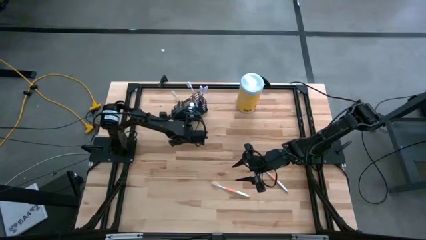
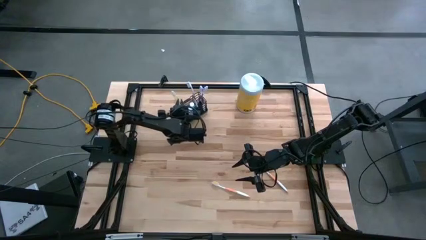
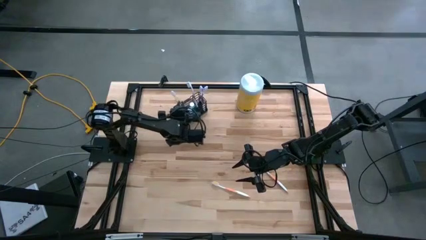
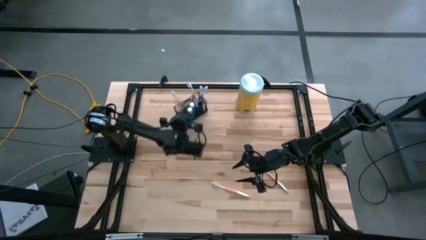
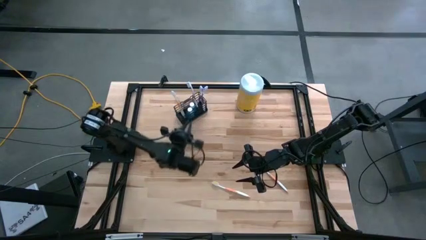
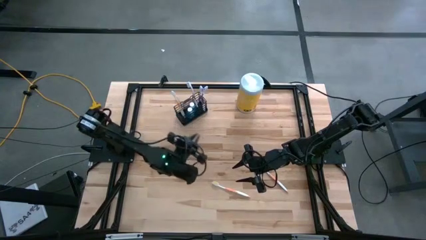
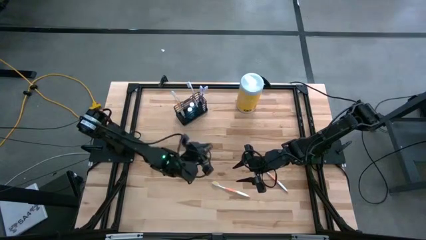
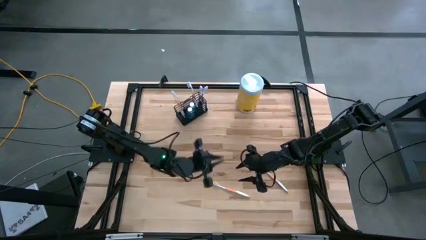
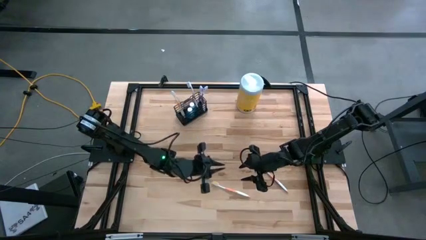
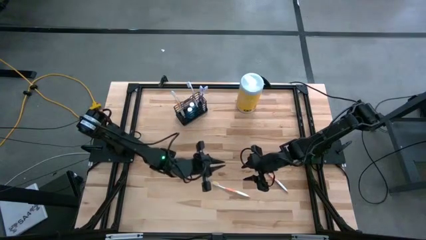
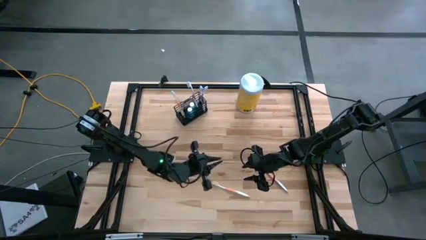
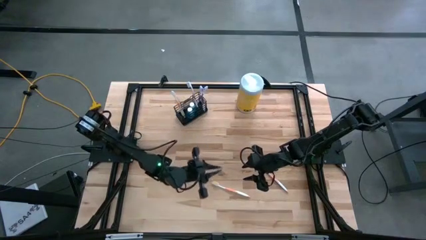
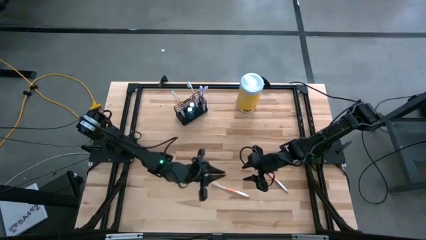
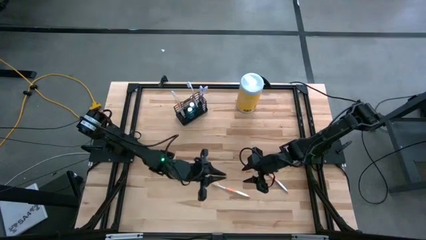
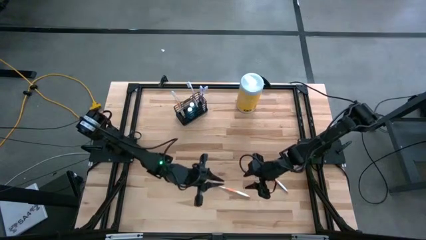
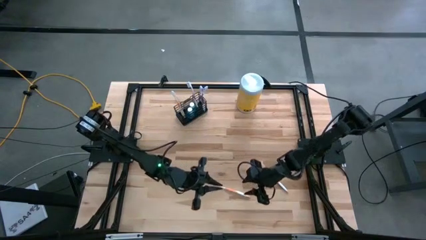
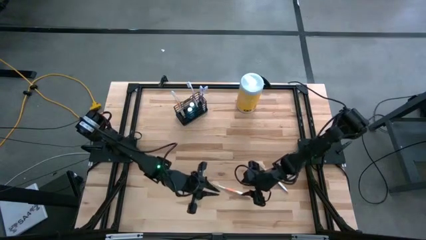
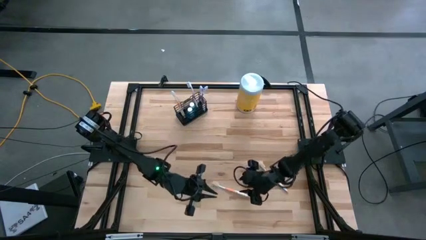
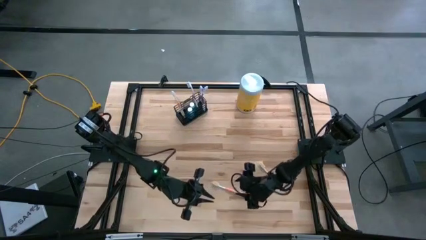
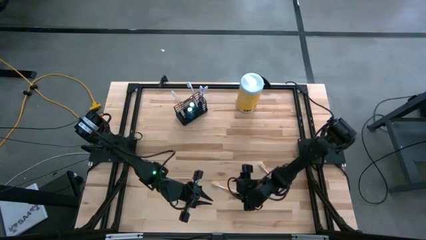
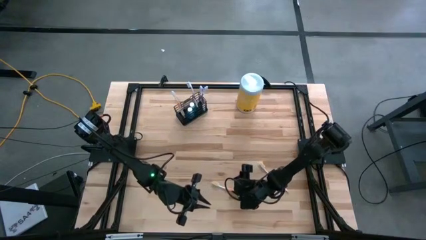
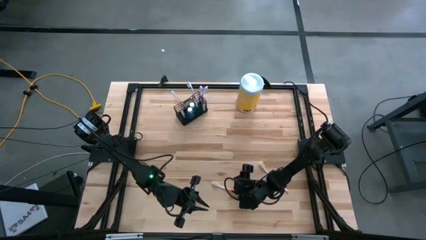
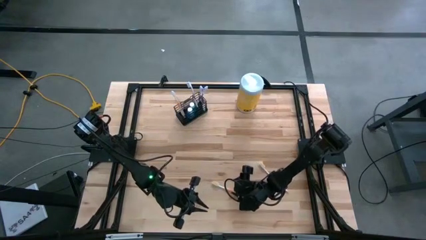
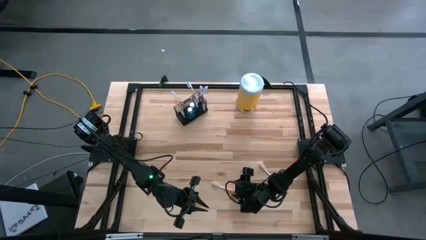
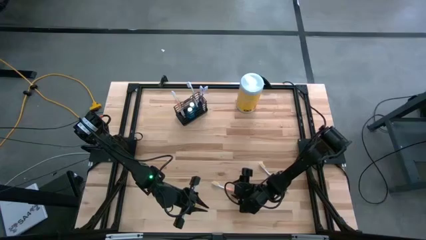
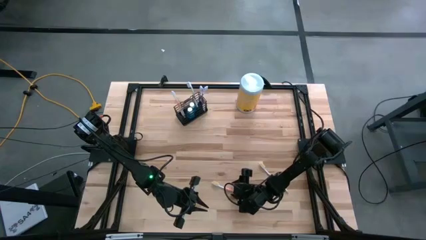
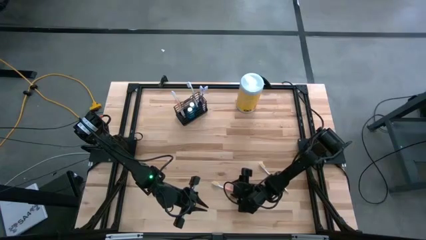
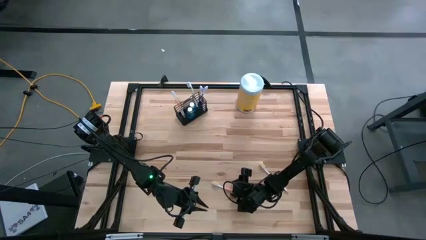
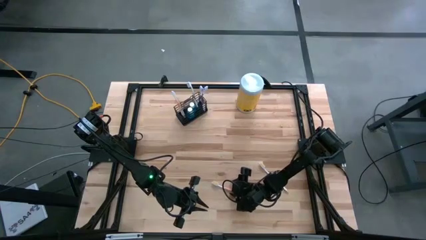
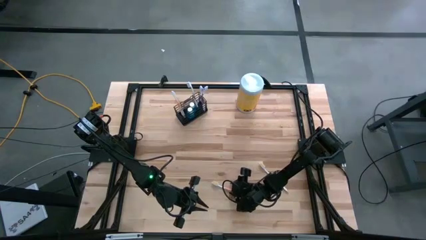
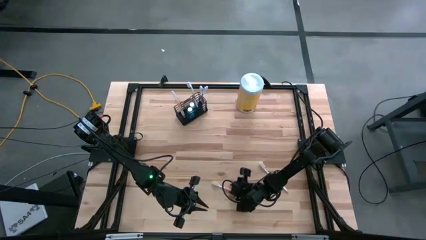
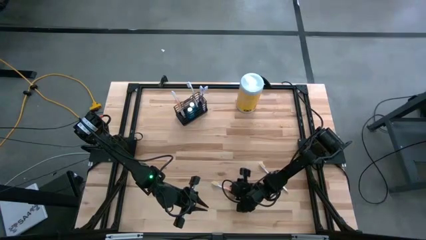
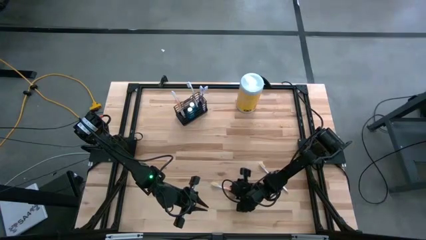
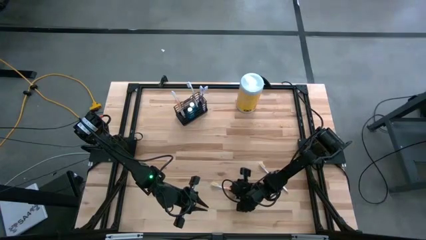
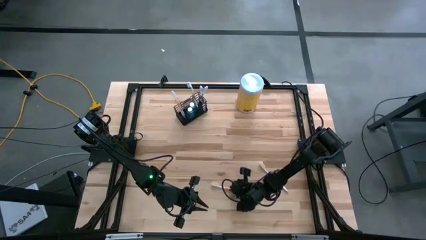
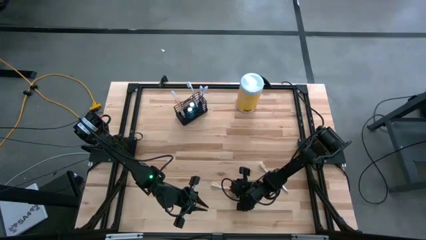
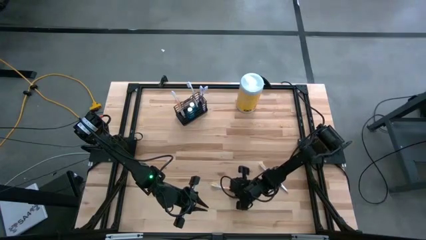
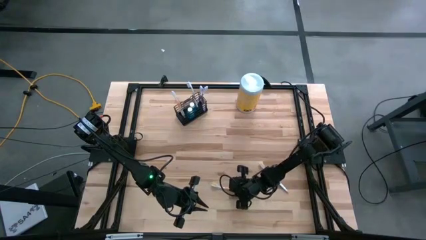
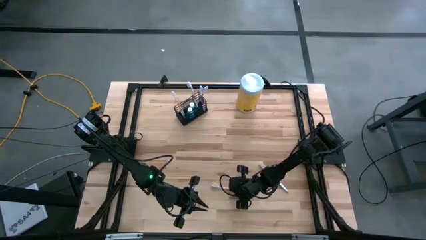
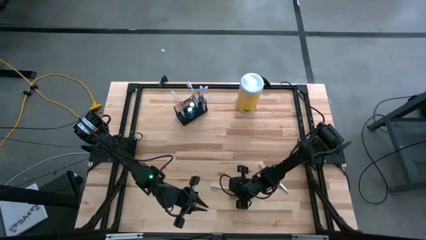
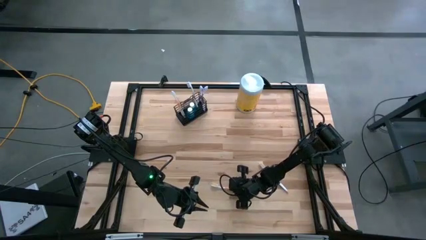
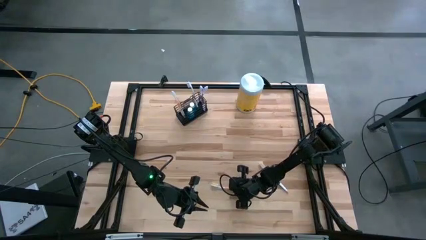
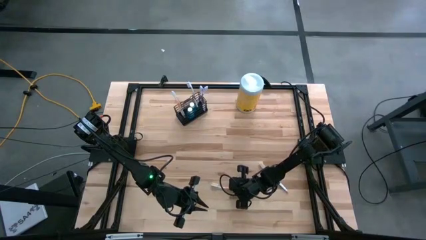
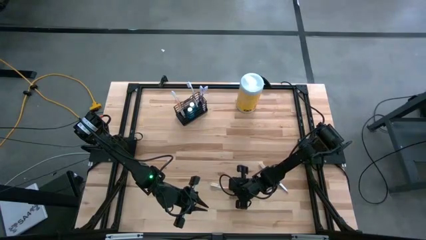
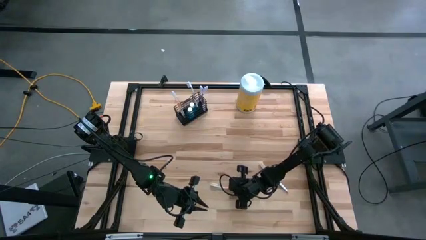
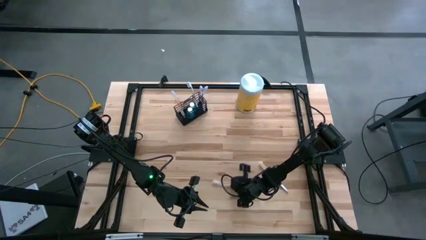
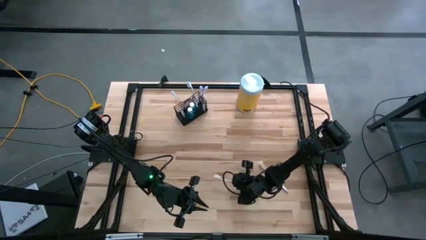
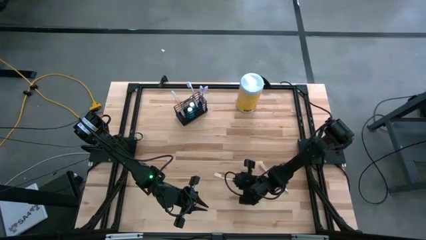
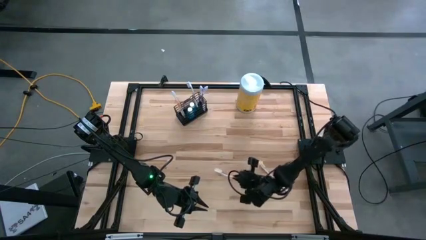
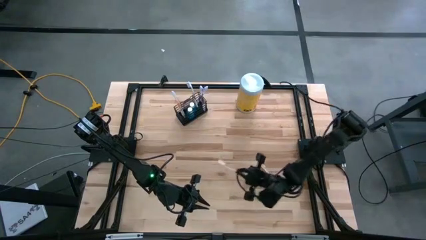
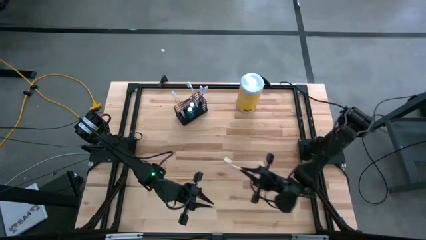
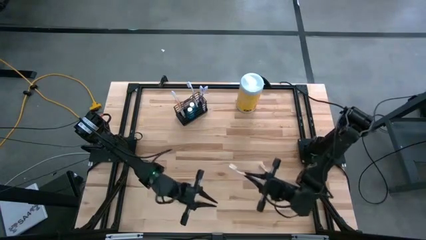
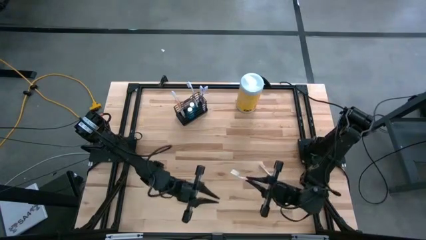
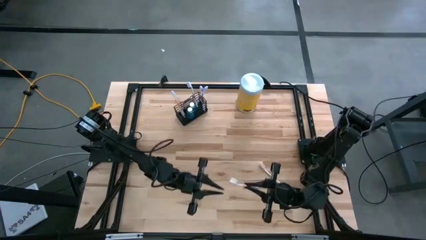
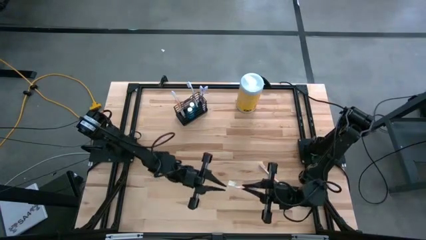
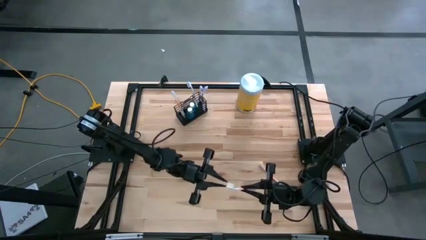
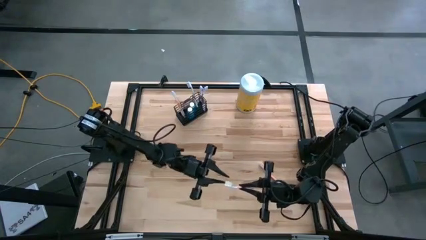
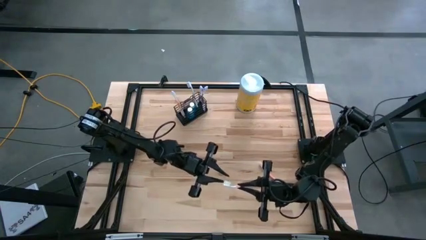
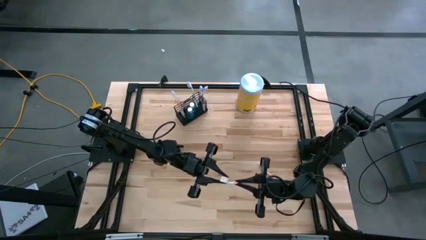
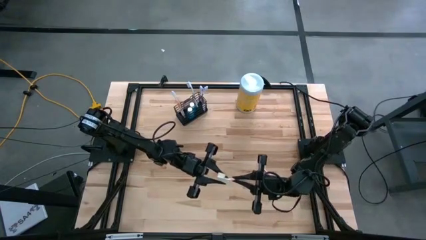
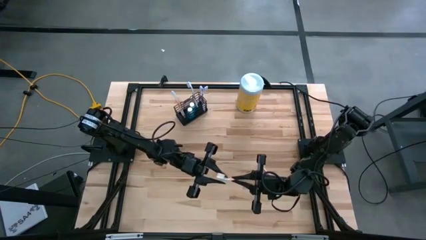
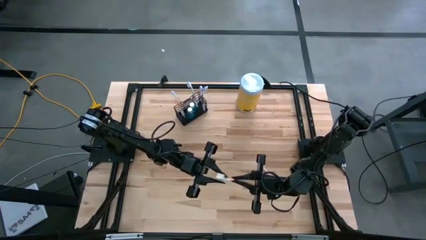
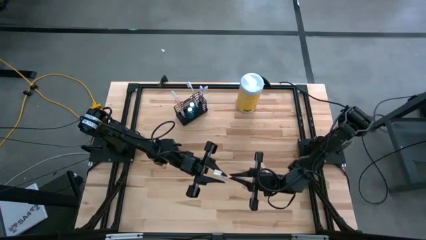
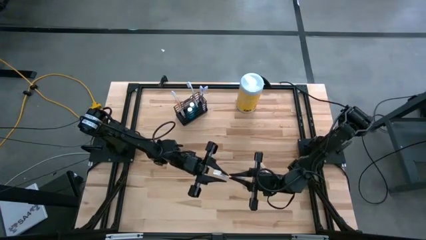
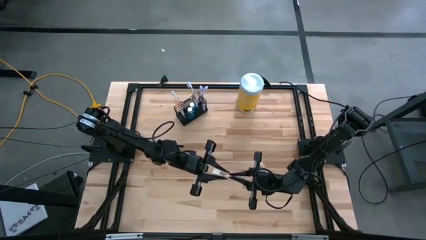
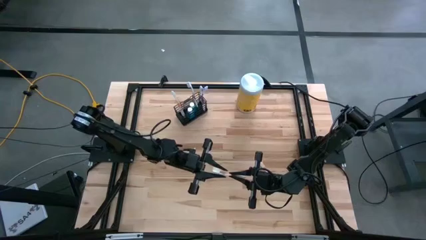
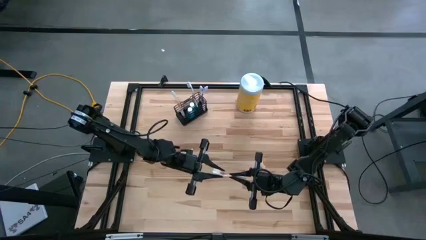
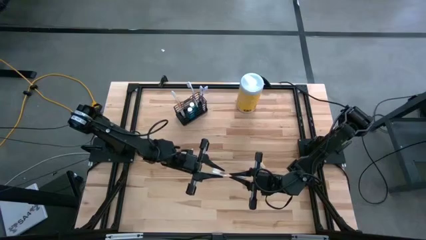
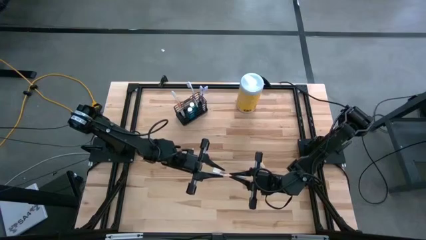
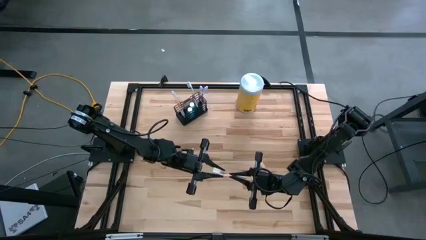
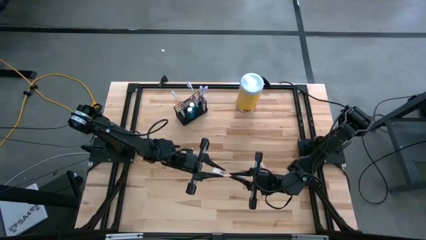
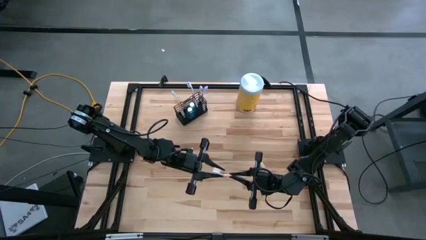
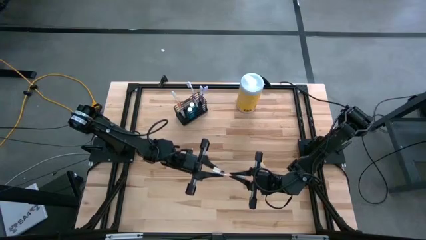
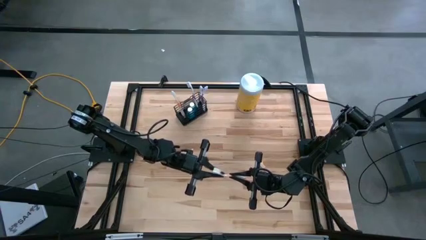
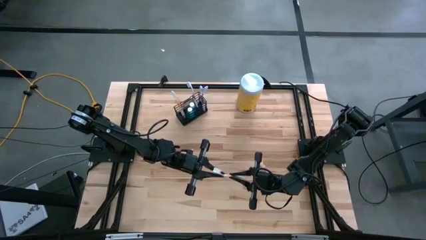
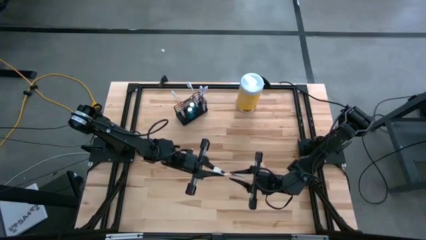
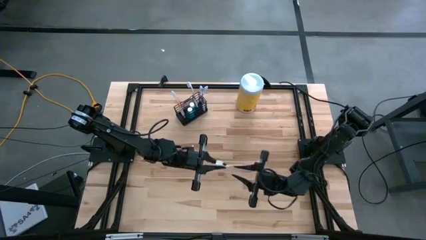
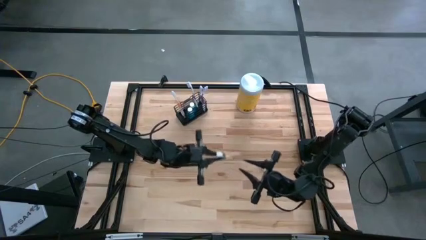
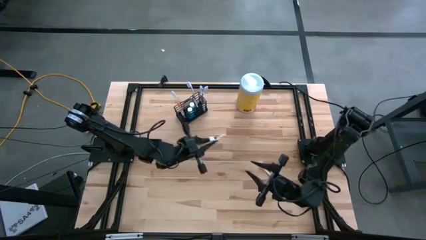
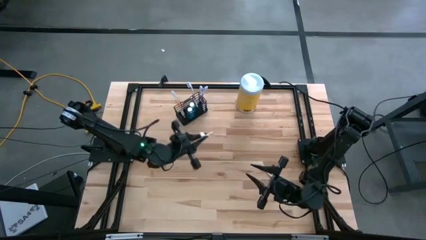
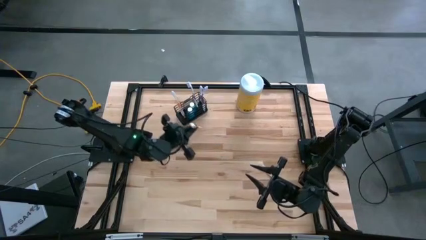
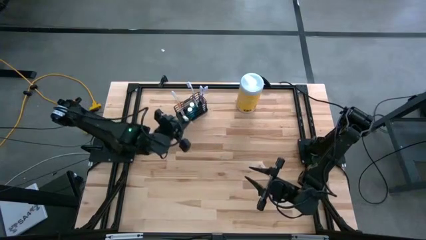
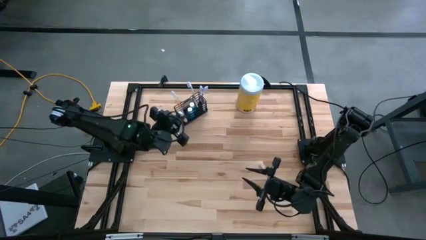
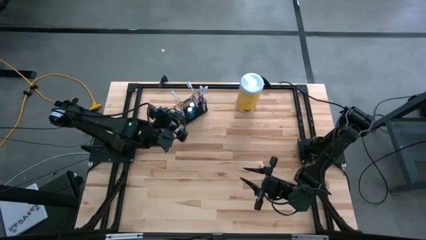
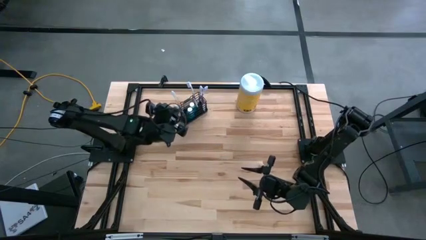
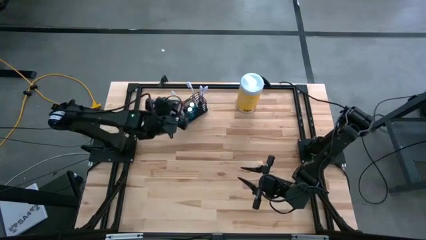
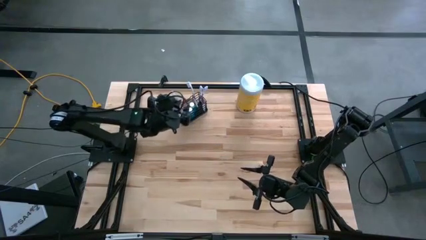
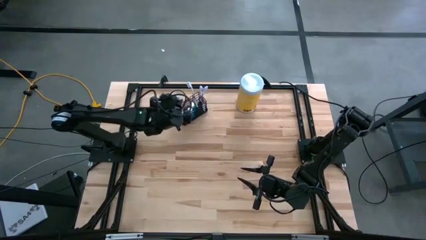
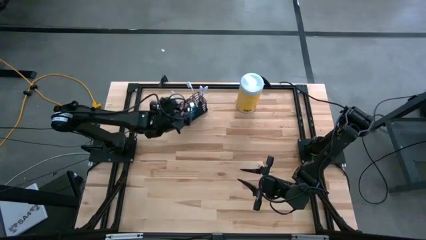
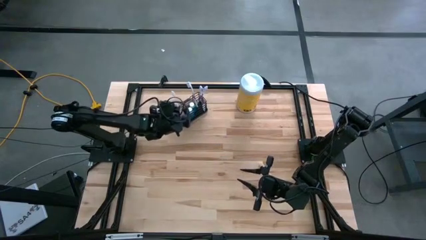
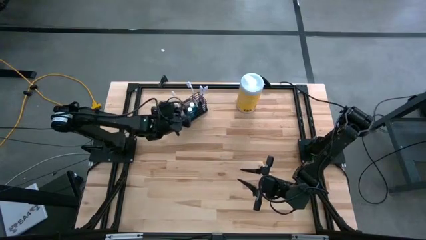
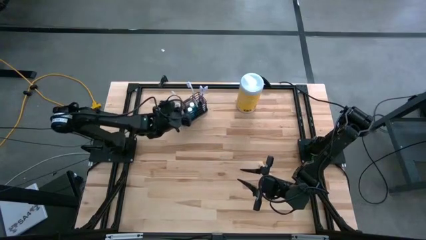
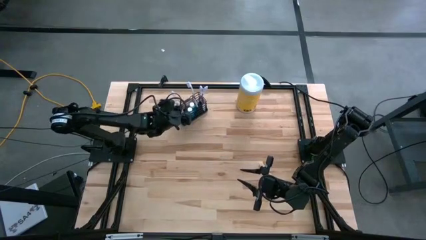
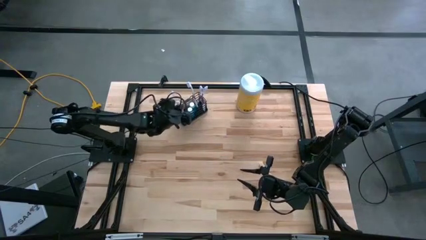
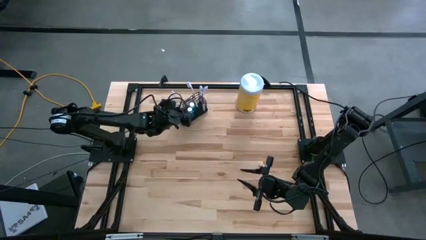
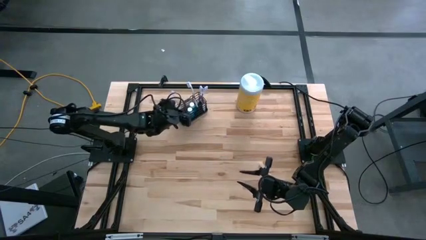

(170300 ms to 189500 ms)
Task: Pick & Place toothbrushing station
Put the left orange toothbrush into the left section of the wire organizer
